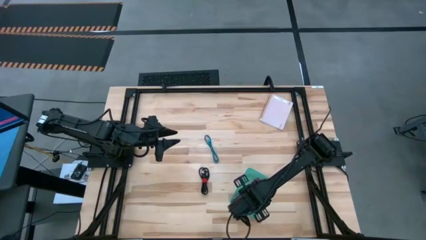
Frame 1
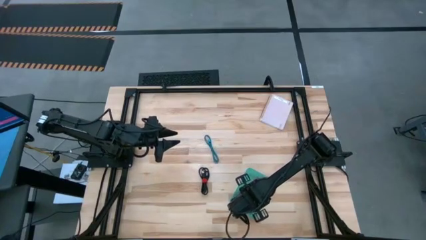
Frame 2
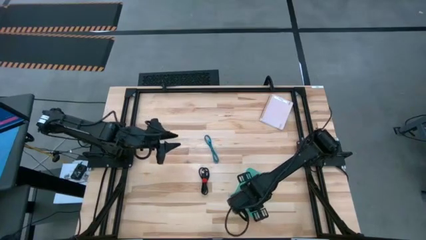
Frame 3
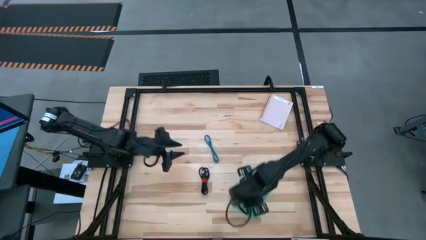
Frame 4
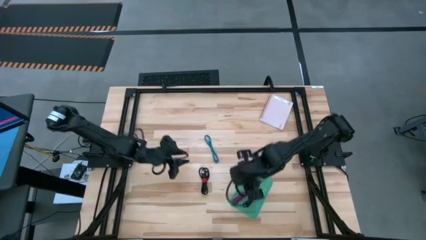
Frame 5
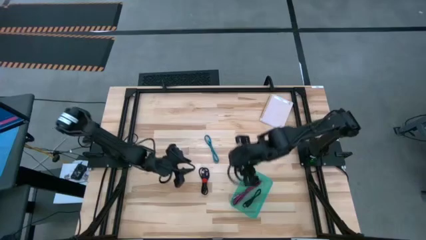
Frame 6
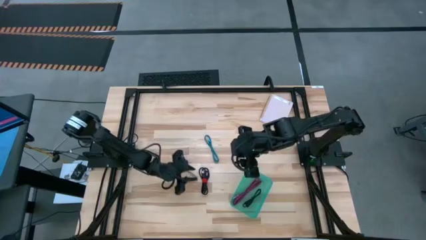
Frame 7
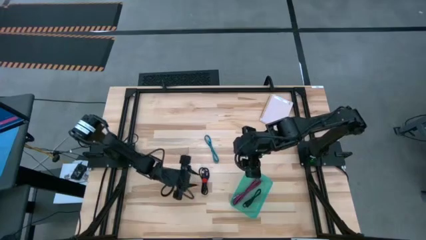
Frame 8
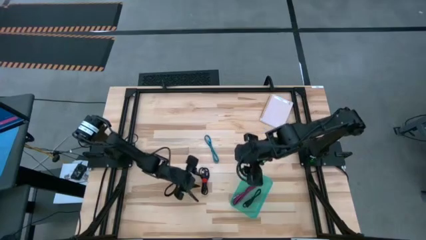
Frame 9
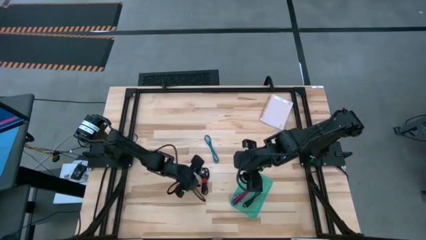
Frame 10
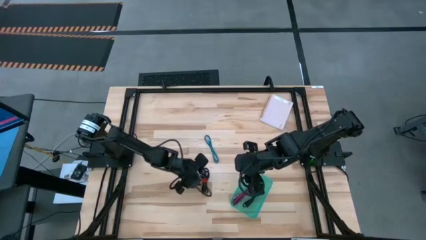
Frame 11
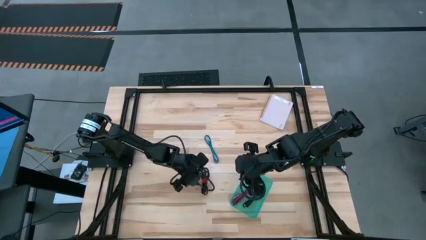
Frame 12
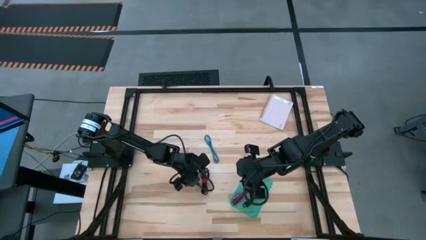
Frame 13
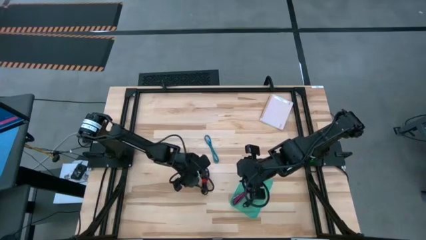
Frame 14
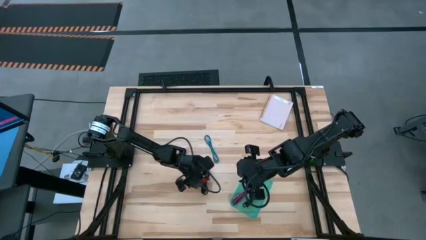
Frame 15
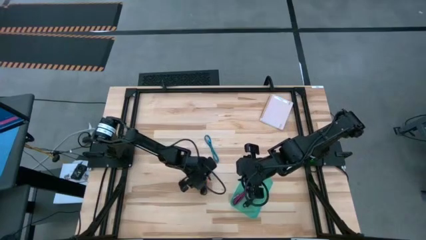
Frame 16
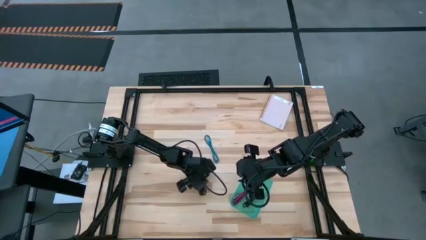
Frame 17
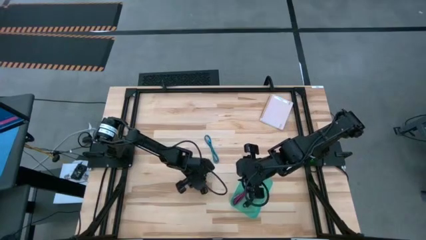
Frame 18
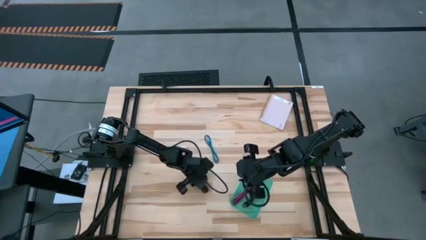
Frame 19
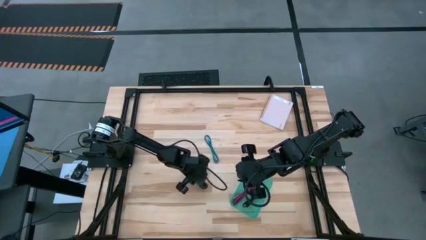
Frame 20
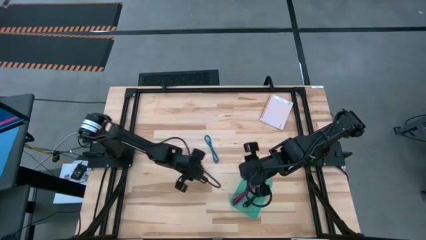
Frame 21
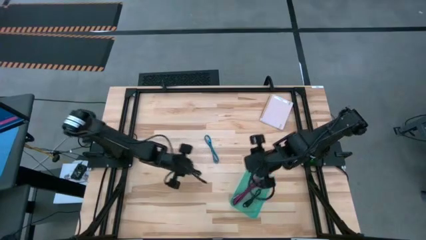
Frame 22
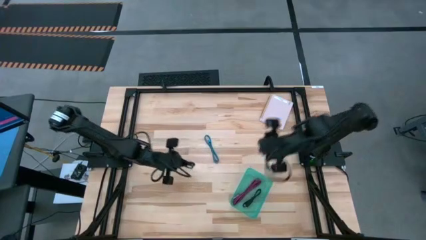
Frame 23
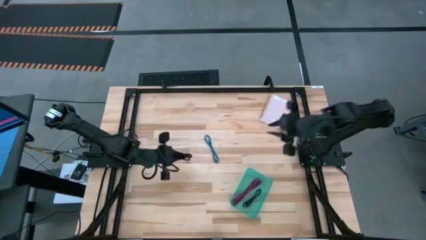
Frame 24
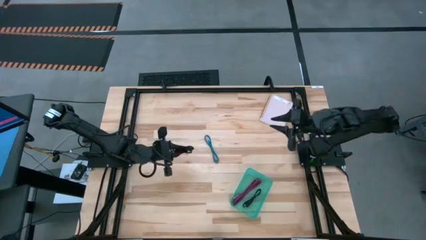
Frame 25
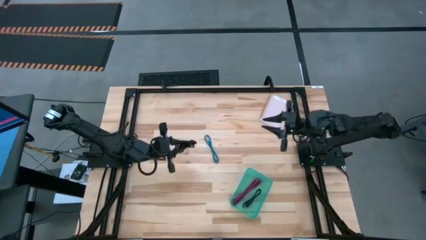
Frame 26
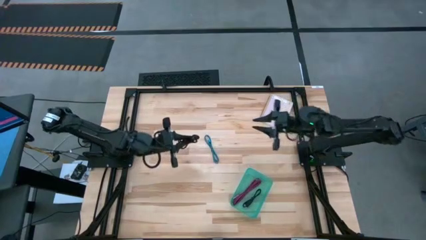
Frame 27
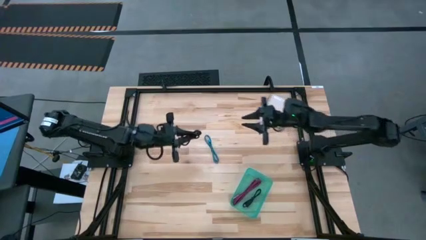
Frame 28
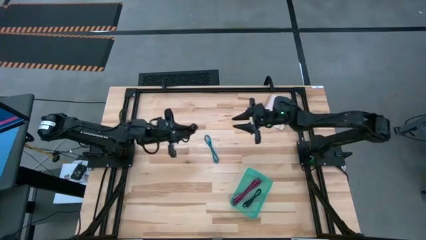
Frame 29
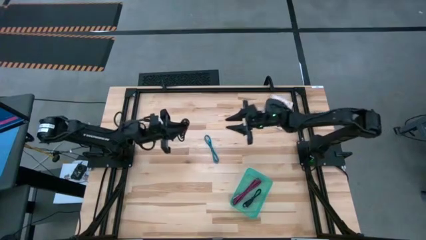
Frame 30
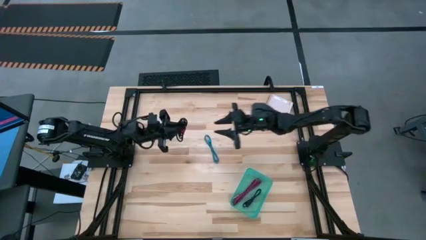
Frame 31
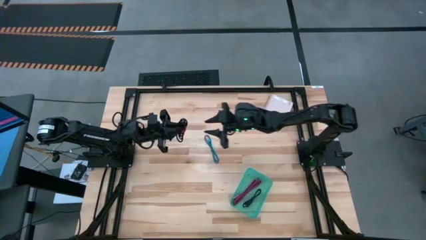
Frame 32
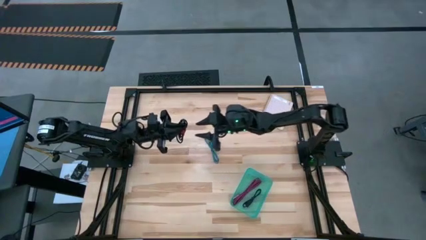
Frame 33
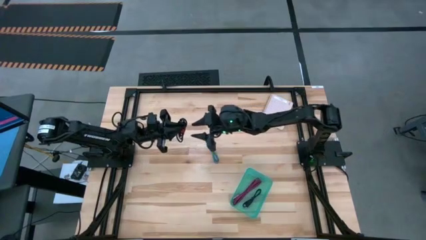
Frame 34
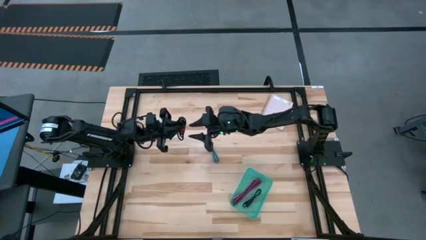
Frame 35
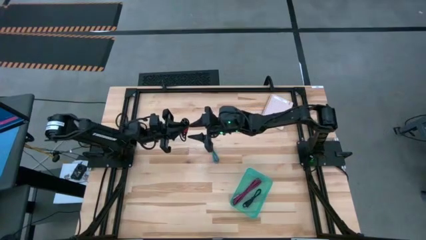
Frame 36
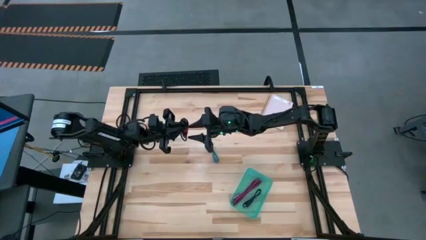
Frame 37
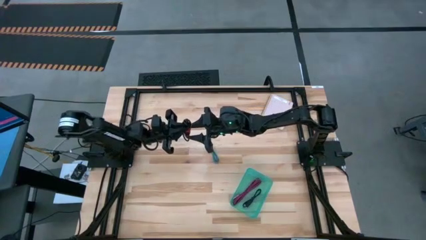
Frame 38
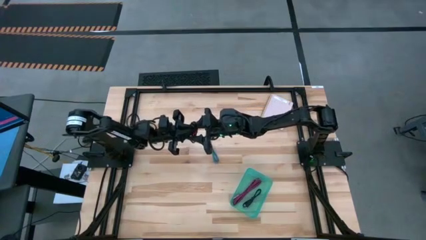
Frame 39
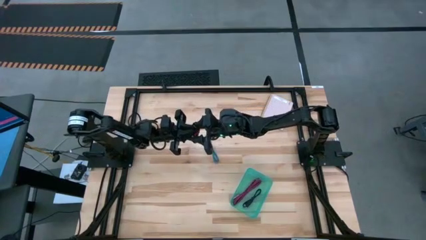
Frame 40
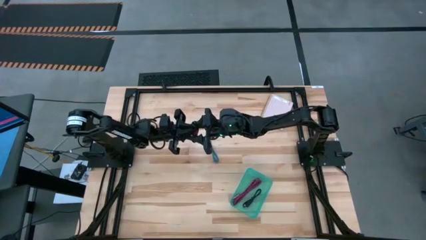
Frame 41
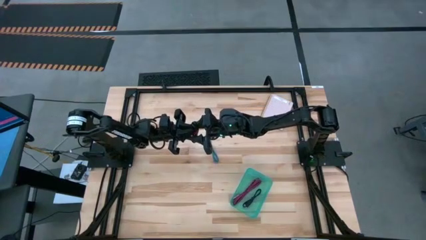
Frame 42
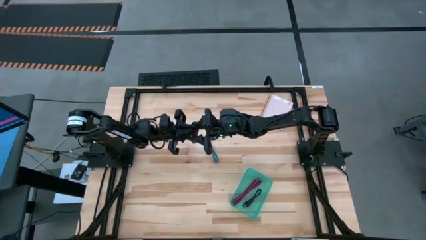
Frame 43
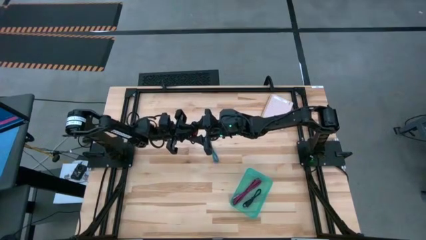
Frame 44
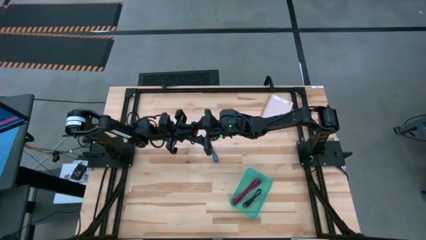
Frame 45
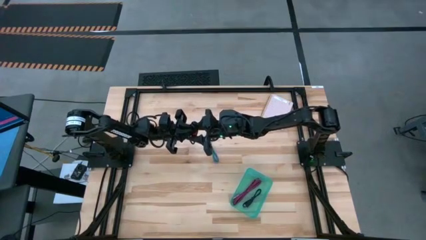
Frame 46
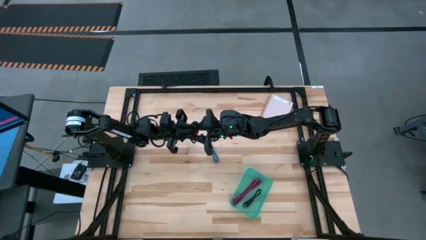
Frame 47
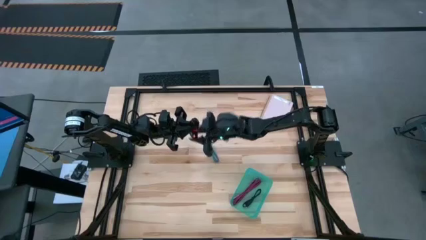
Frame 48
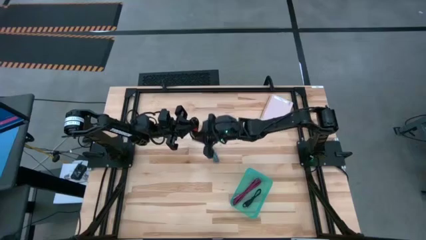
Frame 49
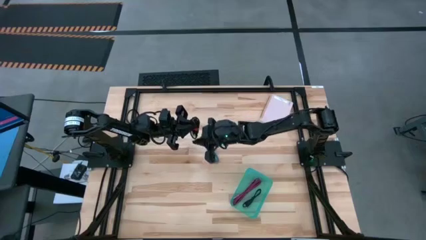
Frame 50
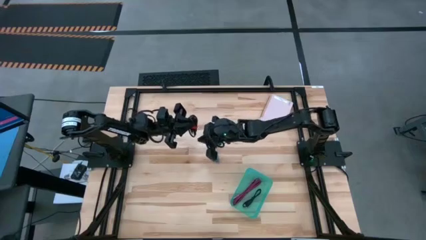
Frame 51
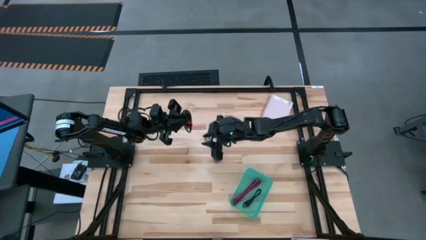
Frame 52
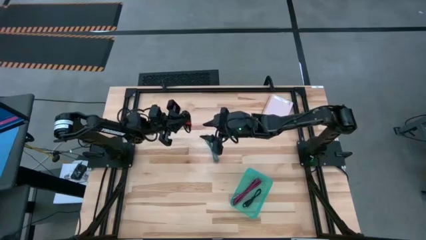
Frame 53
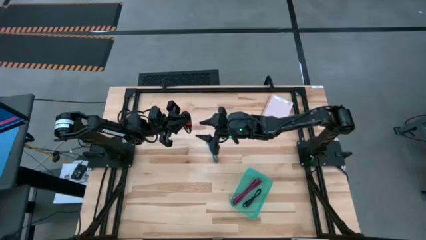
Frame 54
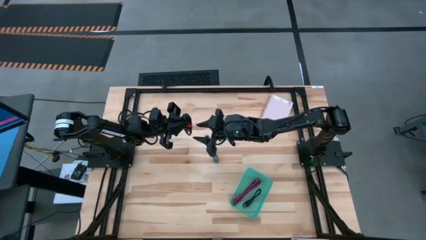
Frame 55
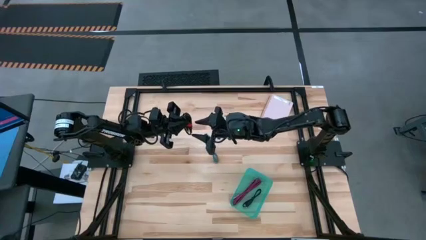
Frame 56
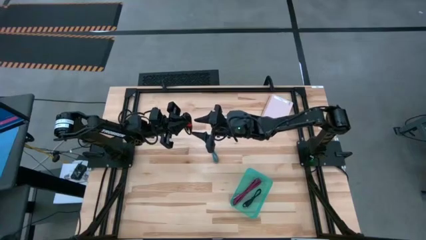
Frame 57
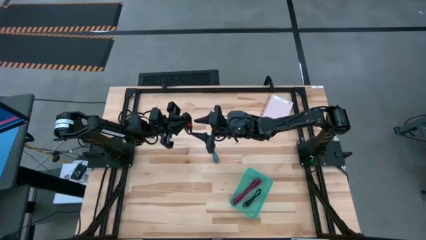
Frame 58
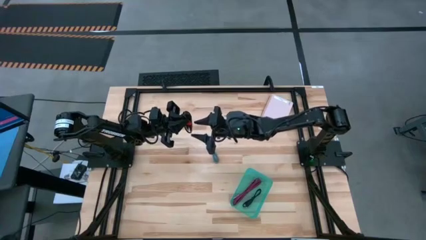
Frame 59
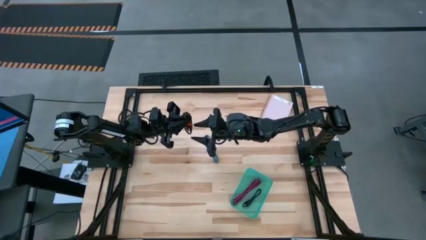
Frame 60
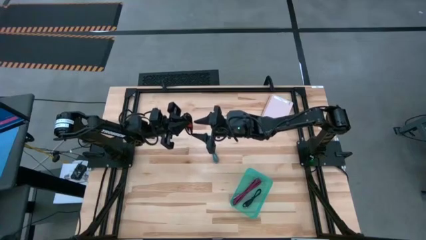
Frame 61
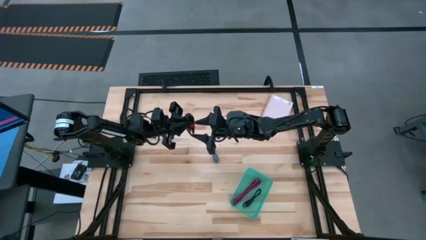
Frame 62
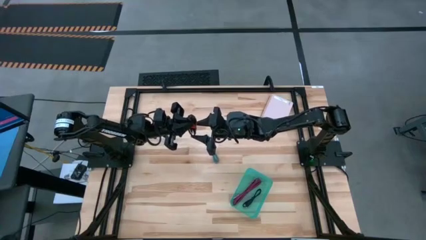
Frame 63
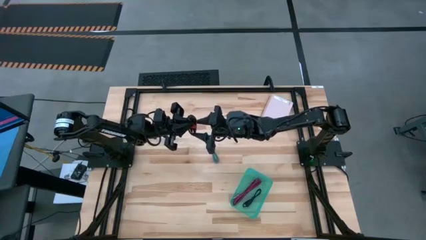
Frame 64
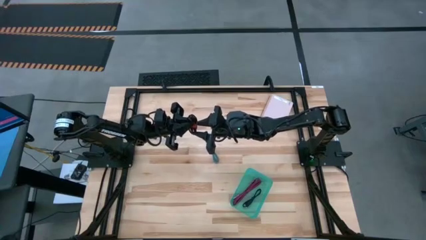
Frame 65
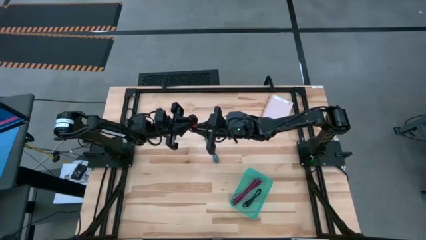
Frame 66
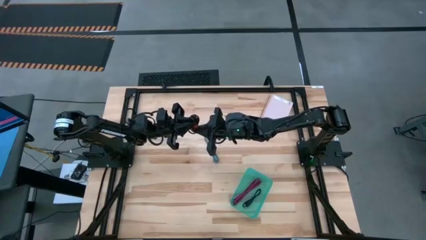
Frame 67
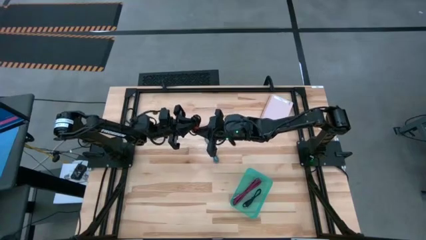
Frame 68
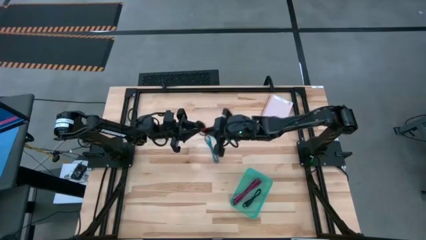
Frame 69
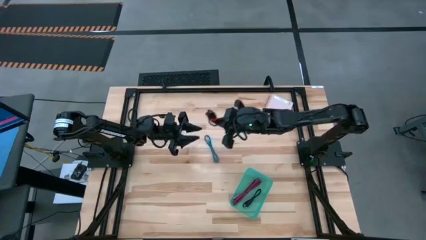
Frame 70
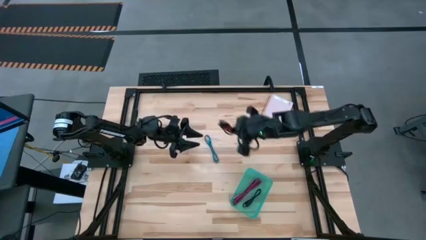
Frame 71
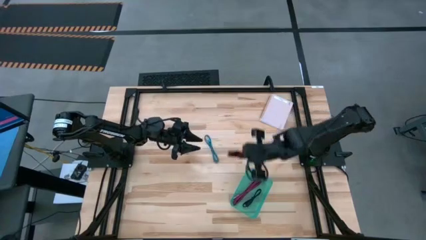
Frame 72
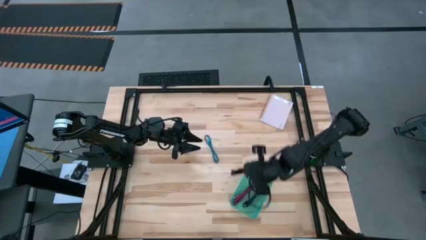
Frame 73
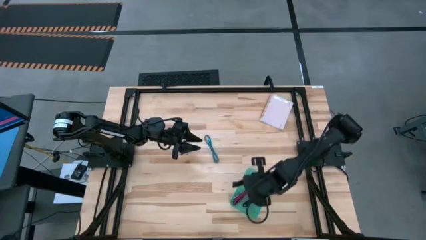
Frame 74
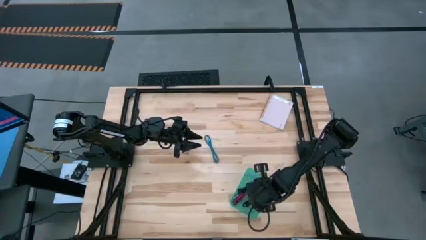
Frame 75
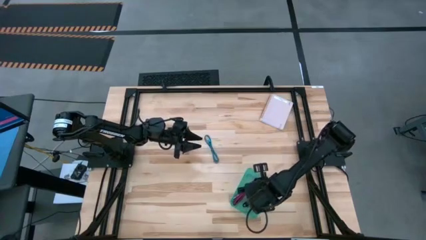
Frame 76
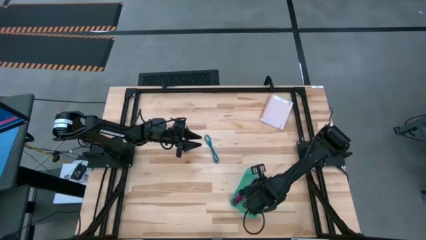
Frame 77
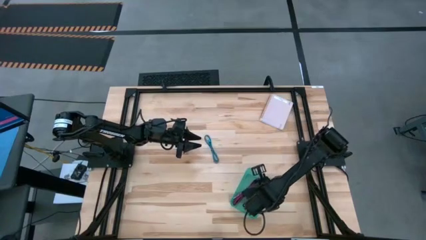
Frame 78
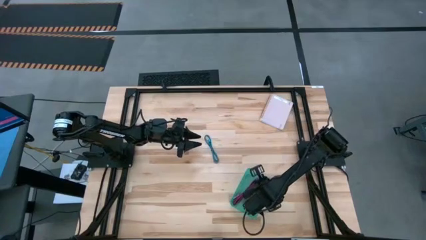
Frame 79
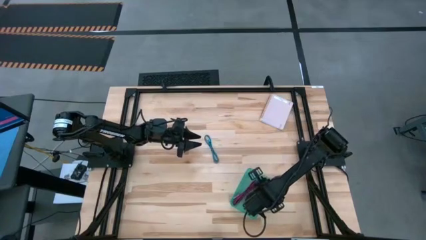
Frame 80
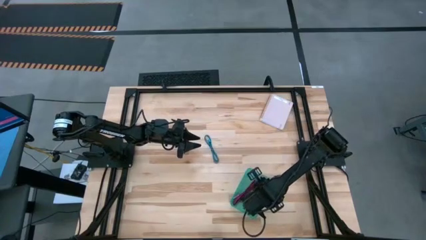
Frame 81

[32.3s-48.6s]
Task: Pick and place USB-C Cables
Put the black usb cable into the bin
